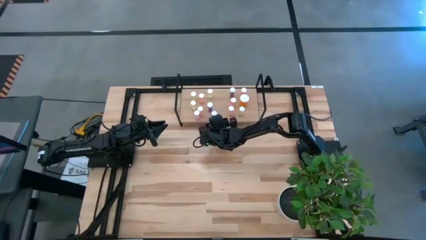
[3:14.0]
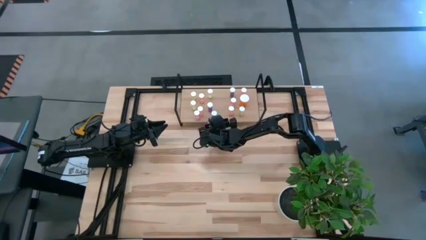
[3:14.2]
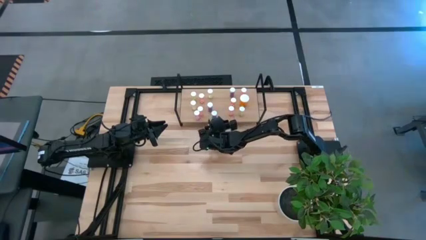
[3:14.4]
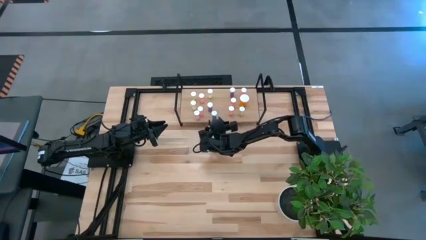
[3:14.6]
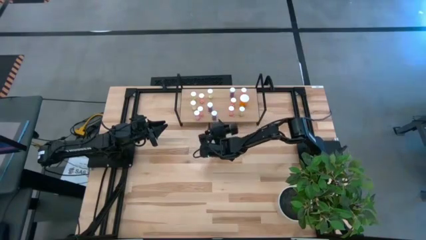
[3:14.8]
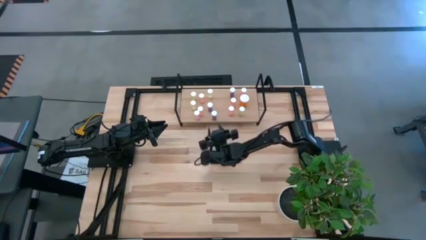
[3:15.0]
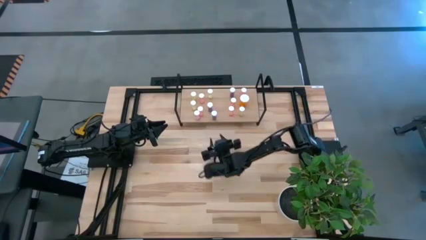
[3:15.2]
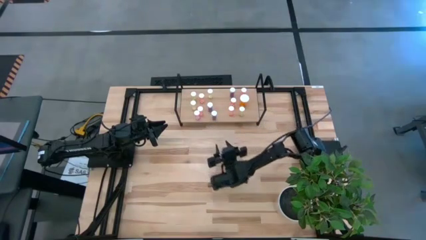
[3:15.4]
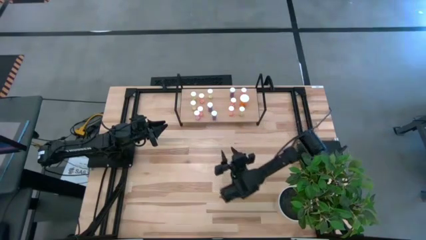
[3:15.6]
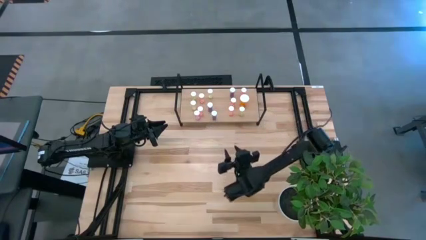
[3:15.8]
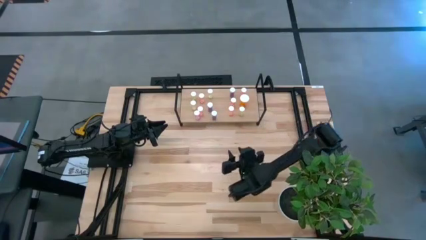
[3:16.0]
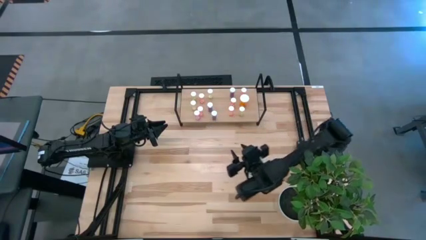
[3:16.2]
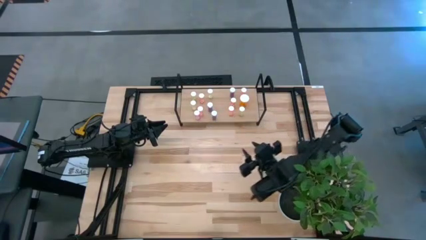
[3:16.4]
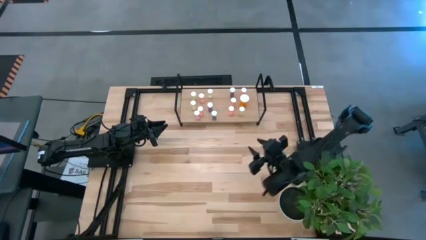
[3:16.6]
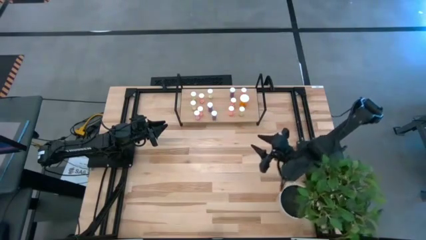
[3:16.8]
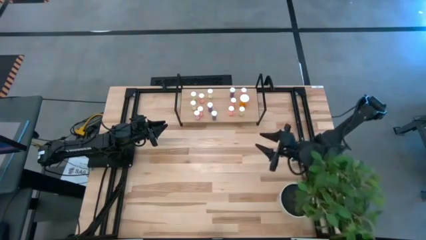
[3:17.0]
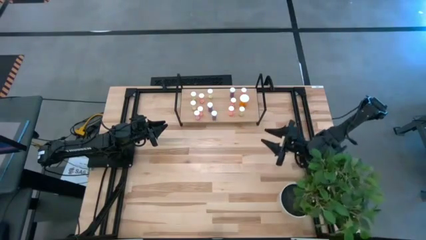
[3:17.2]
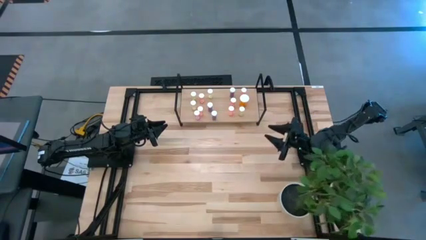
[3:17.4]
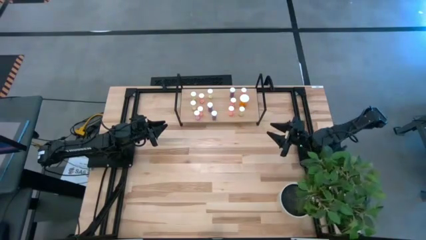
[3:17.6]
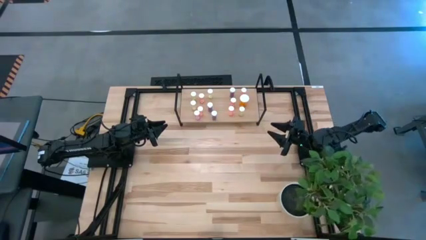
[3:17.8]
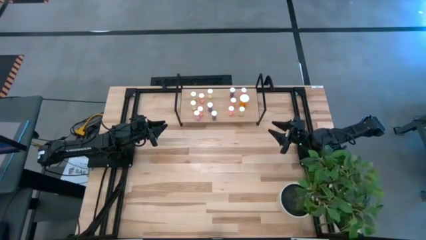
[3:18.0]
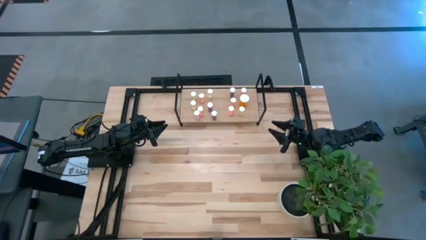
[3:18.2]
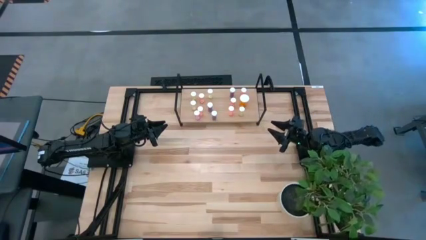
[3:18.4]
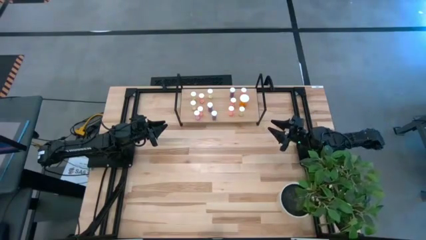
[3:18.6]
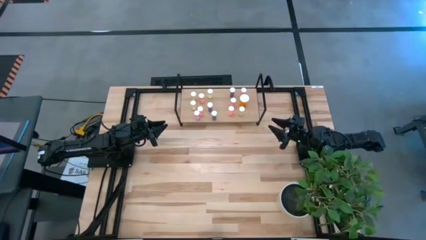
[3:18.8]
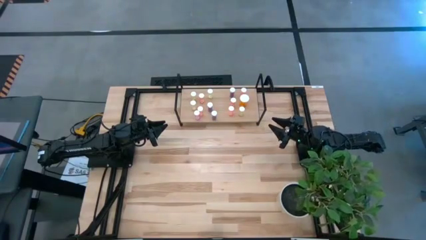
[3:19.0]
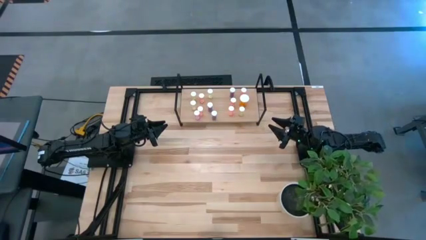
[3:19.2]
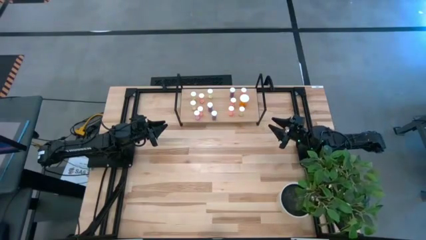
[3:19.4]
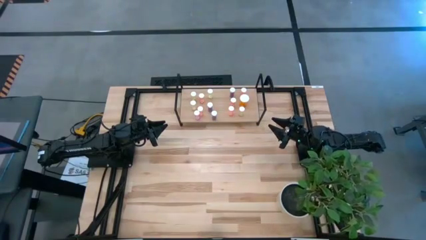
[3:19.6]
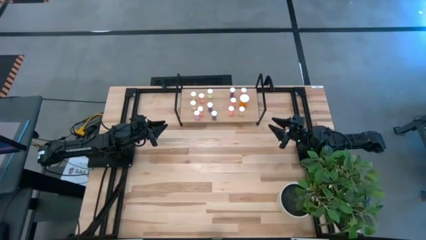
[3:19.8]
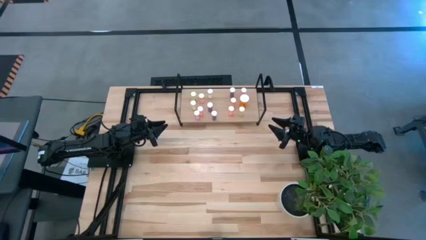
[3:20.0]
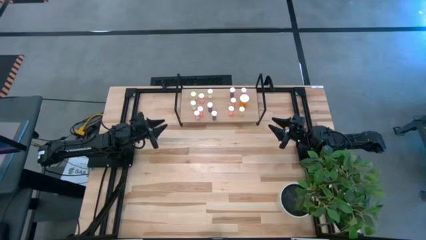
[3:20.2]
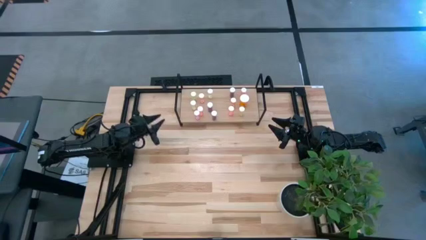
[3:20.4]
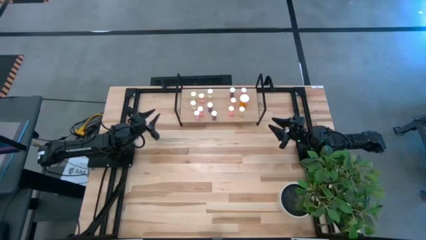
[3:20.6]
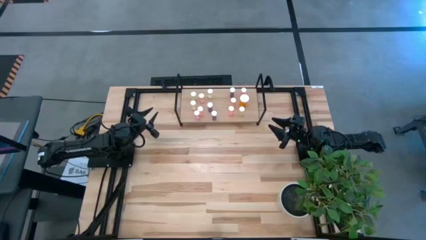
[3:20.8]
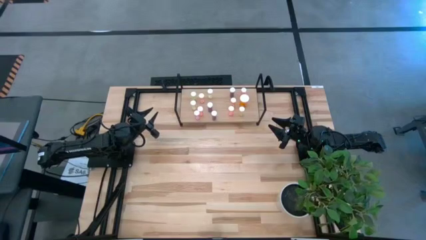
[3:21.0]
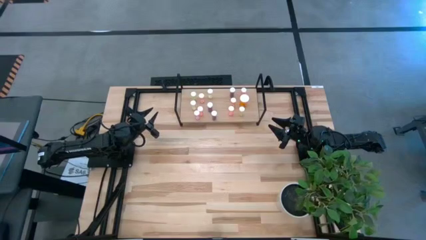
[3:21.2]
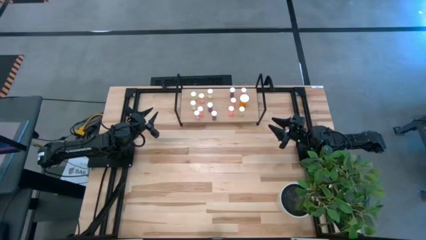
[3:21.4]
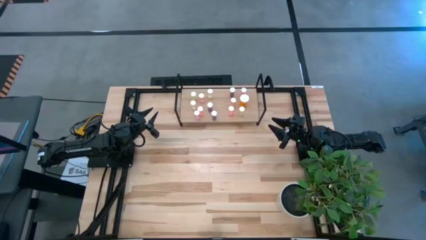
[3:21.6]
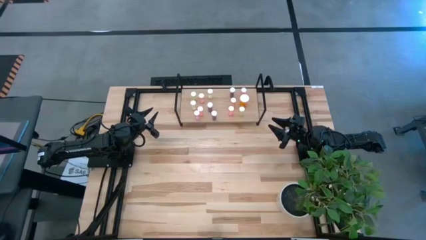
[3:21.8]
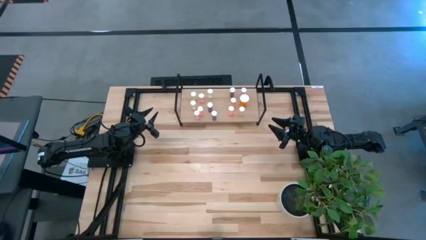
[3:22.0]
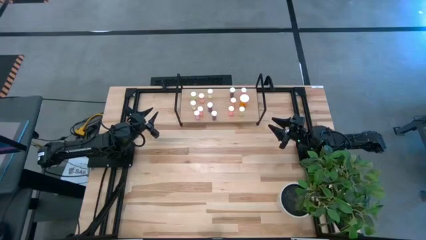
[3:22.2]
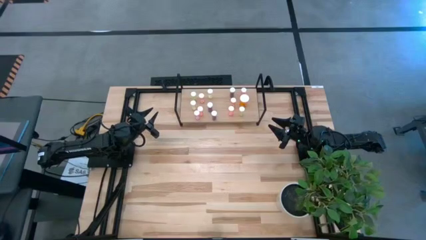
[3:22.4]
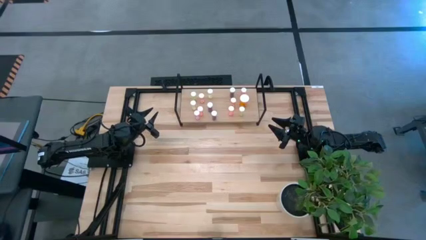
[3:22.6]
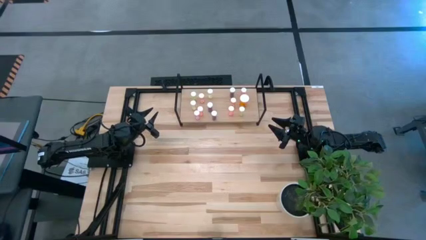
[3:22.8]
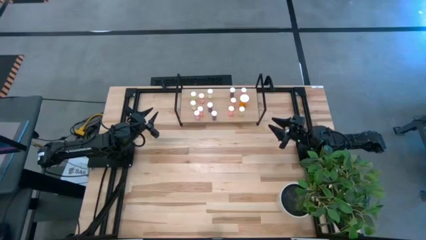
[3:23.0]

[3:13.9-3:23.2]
Task: Pick and place medicine bottles onto shelf by color
Return to Home Position

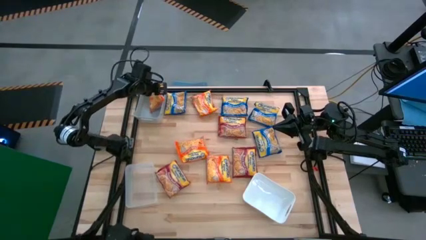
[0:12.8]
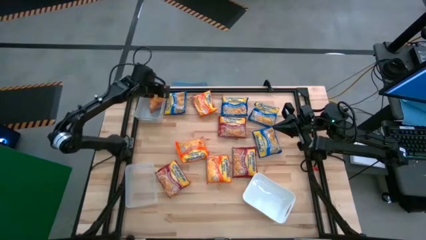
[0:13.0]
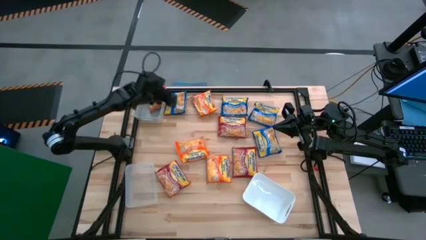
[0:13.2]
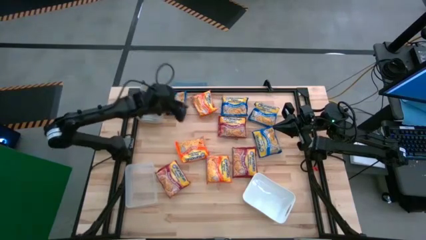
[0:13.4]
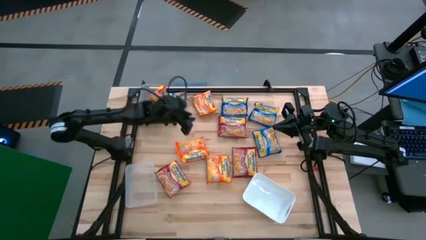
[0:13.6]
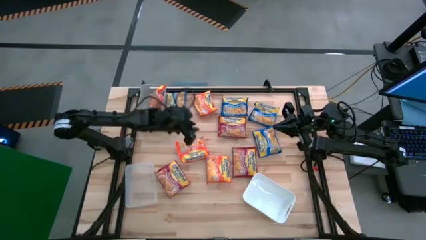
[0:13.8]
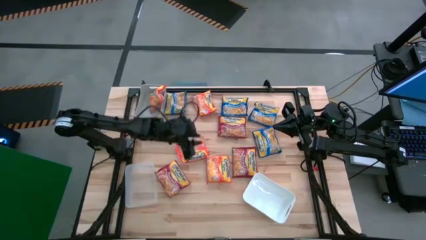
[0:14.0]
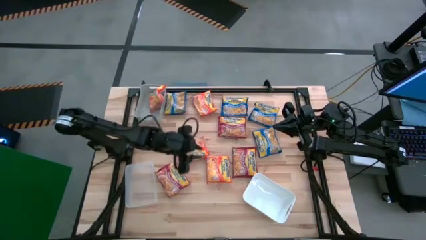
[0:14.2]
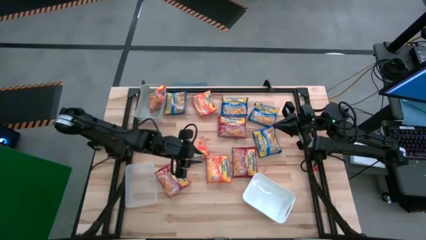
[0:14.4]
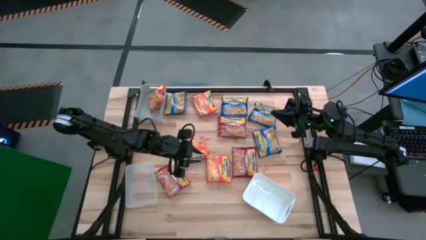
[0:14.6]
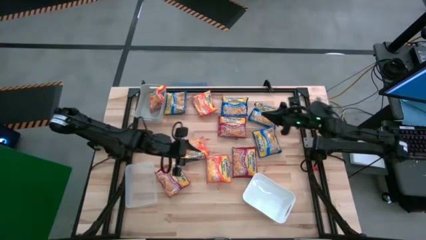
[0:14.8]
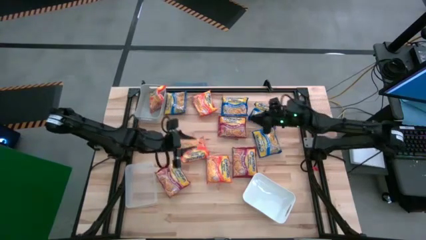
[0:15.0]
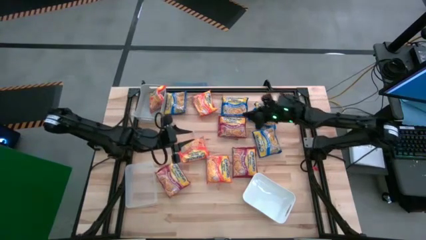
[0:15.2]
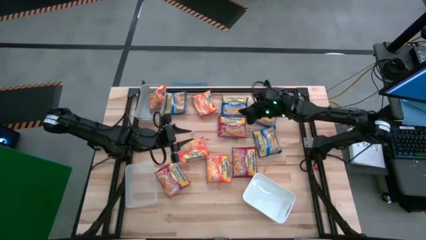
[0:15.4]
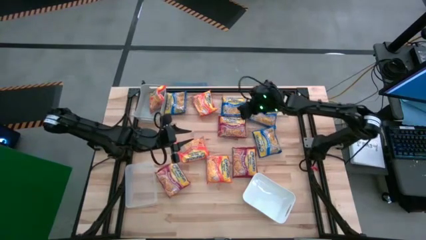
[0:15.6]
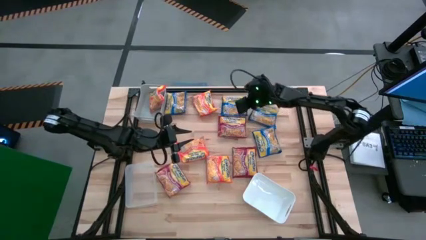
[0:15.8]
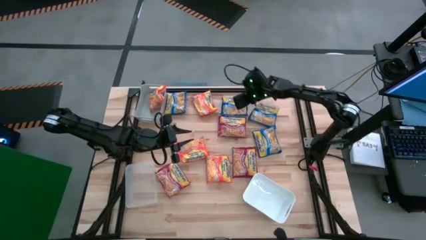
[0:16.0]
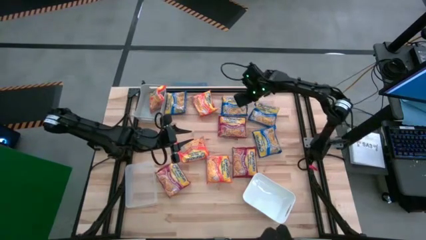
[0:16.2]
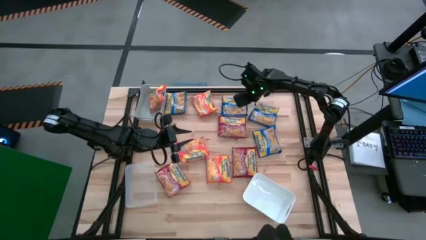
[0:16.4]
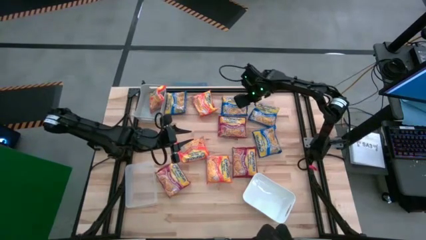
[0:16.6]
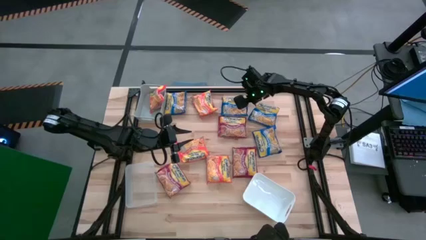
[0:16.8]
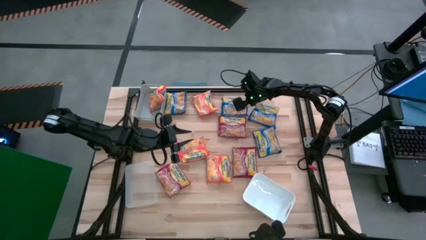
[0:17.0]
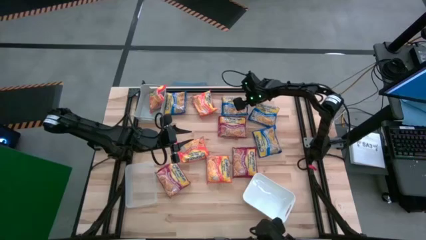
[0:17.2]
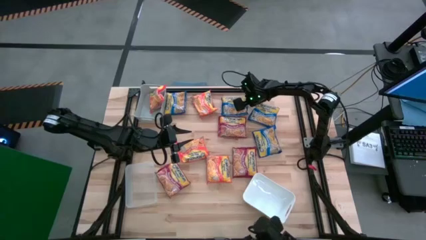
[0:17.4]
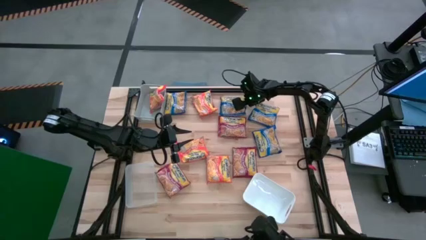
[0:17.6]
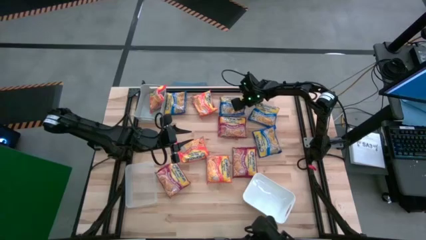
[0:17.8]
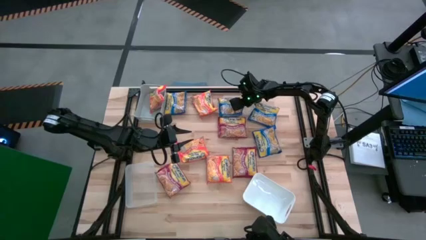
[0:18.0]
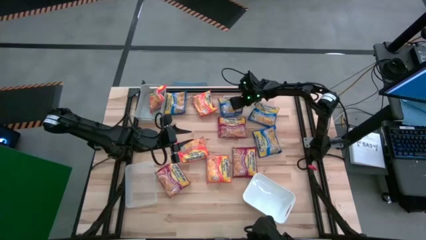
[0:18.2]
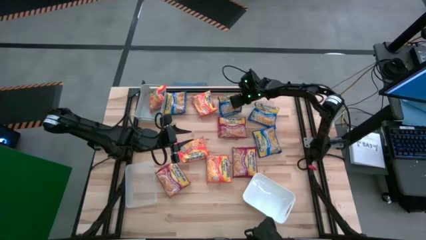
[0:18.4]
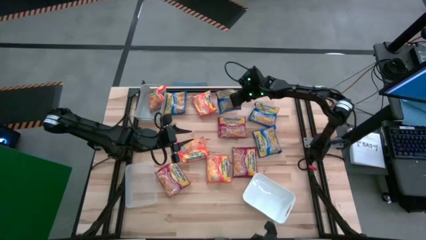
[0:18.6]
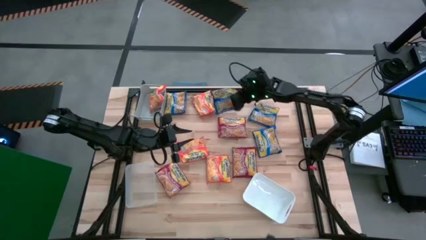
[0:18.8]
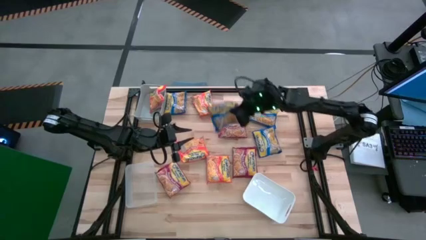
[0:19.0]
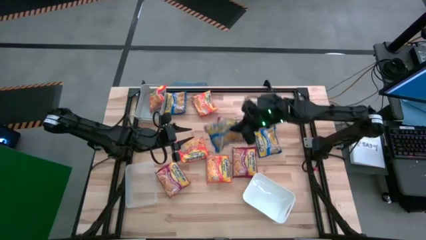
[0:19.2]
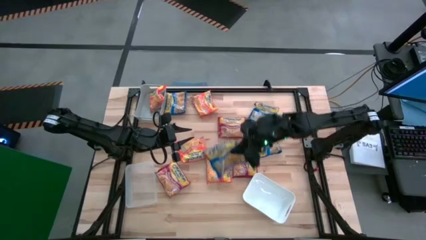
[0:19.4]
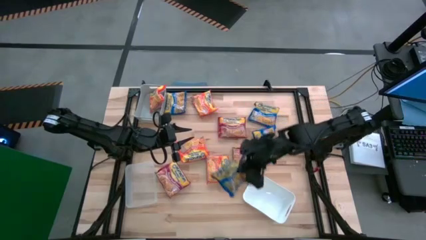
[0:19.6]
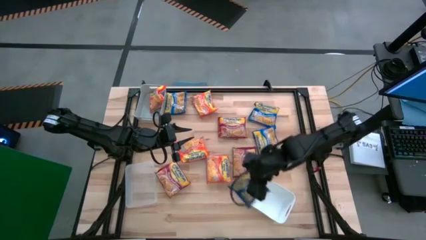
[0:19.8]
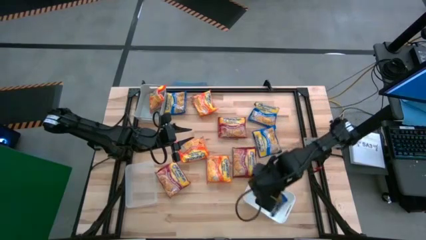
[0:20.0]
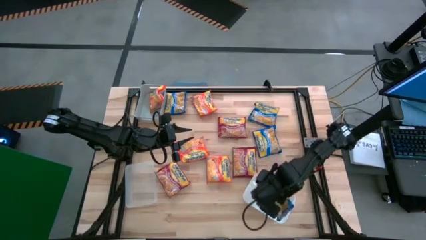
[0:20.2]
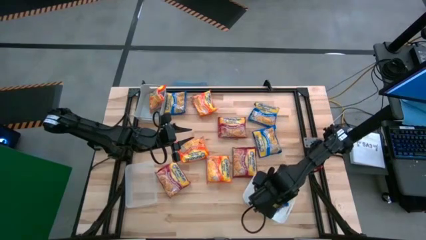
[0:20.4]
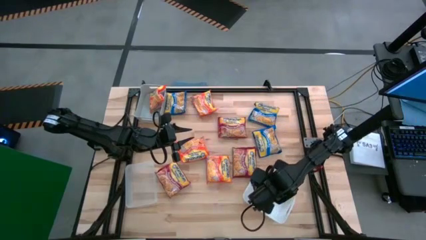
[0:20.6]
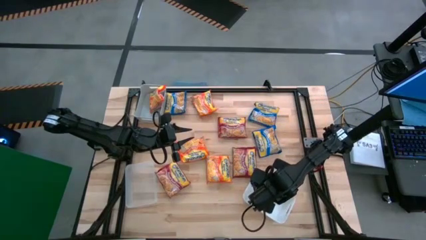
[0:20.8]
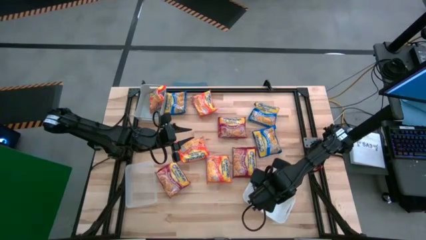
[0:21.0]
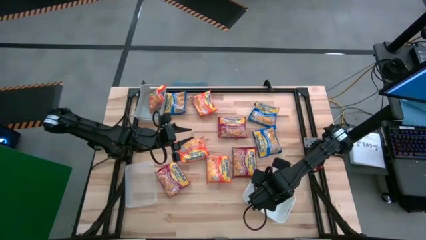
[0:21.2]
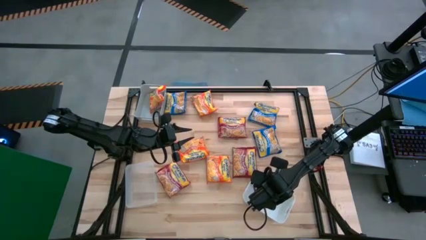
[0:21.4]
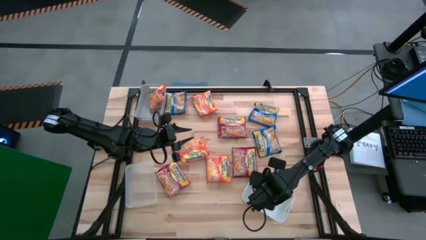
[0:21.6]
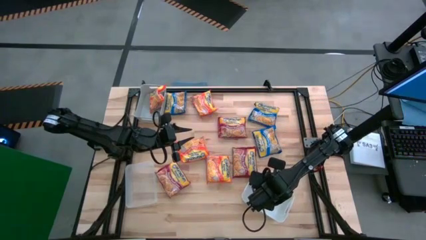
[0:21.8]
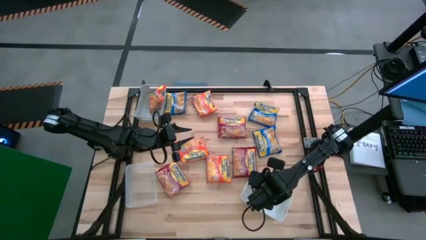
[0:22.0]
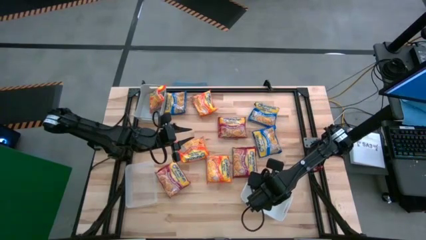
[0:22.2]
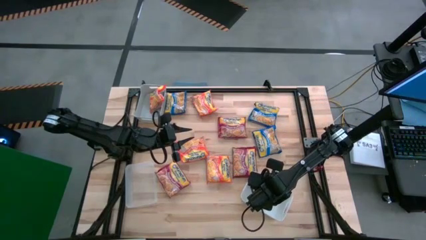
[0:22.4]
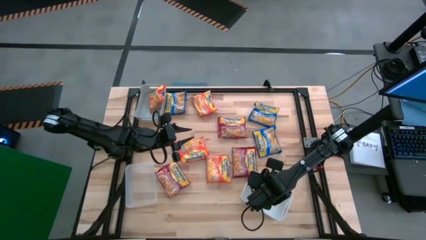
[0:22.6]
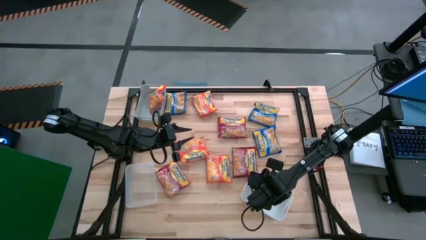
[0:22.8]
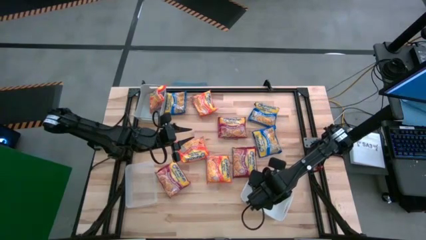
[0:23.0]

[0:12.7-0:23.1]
Task: Sort Maruchan noodles
Put the blue noodle pack into the white bin
